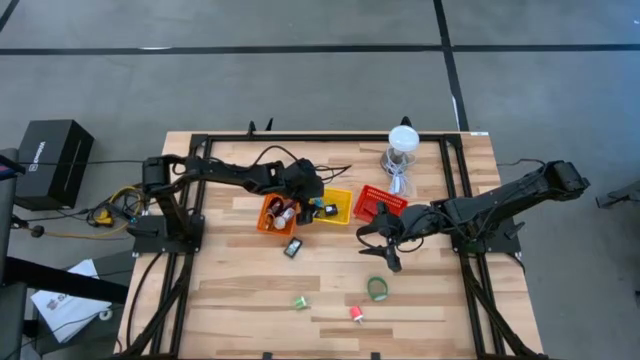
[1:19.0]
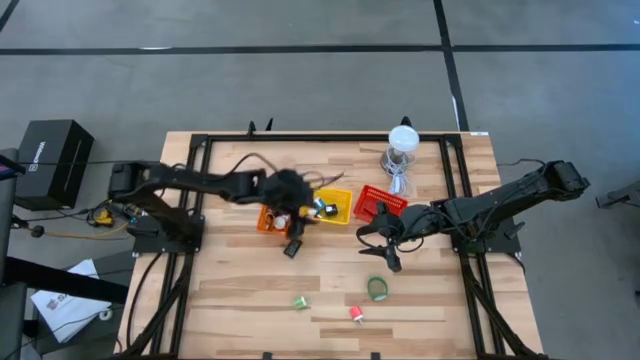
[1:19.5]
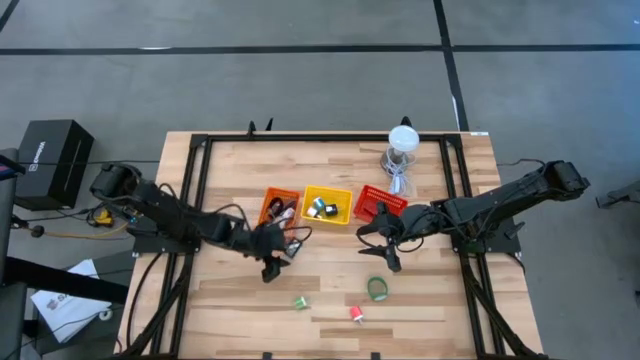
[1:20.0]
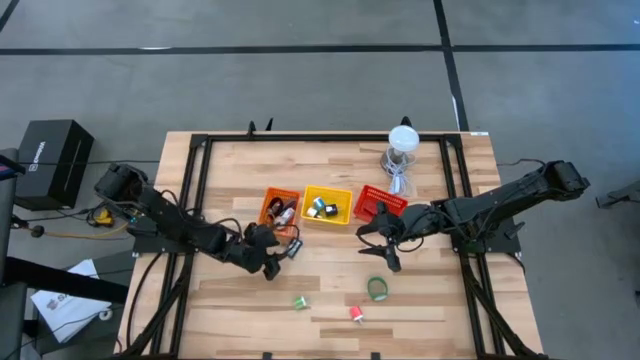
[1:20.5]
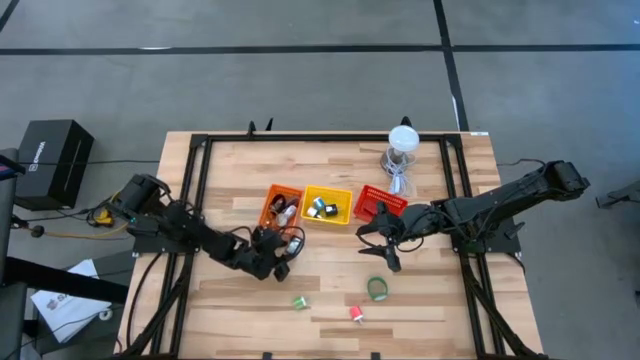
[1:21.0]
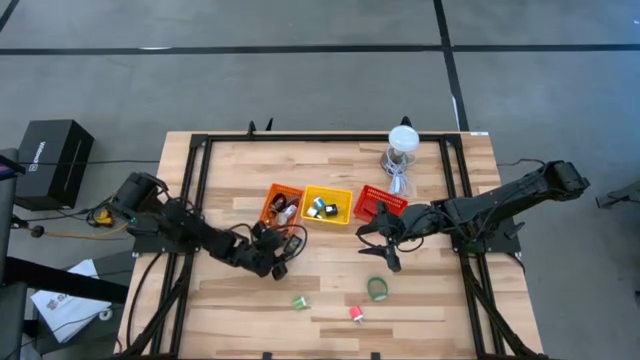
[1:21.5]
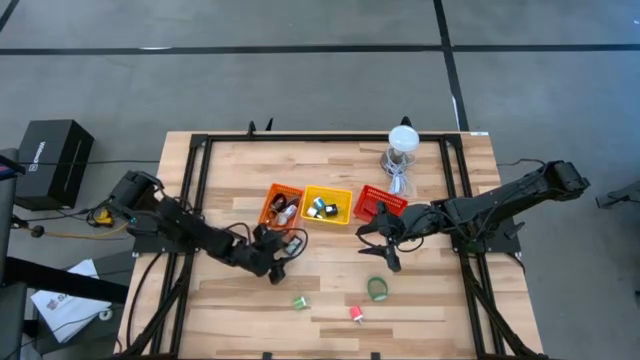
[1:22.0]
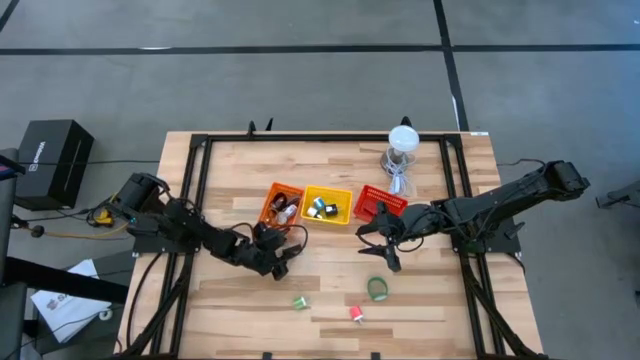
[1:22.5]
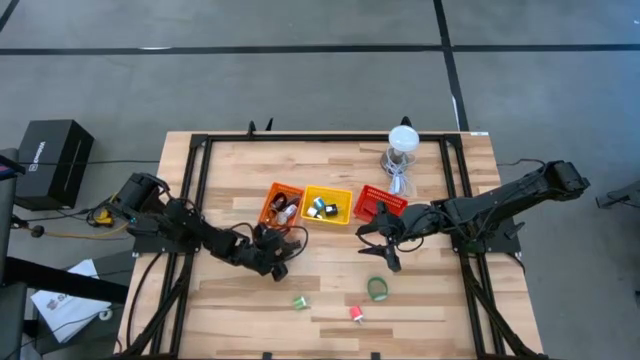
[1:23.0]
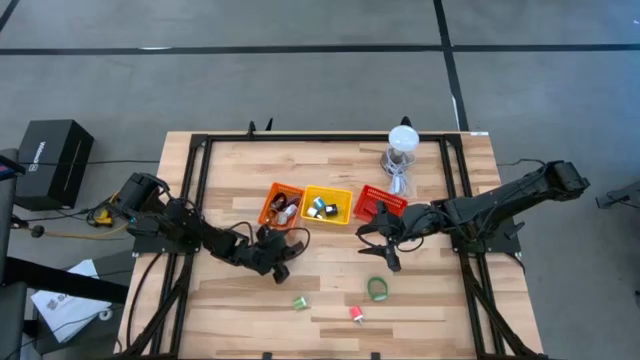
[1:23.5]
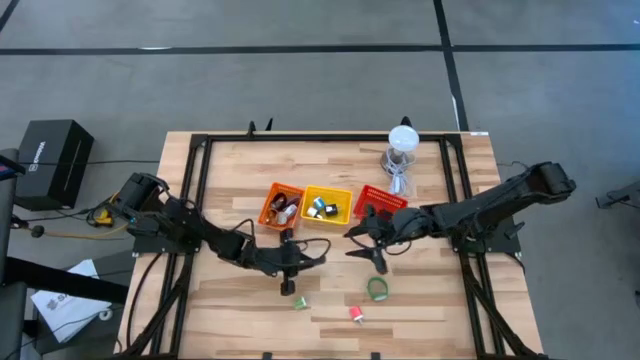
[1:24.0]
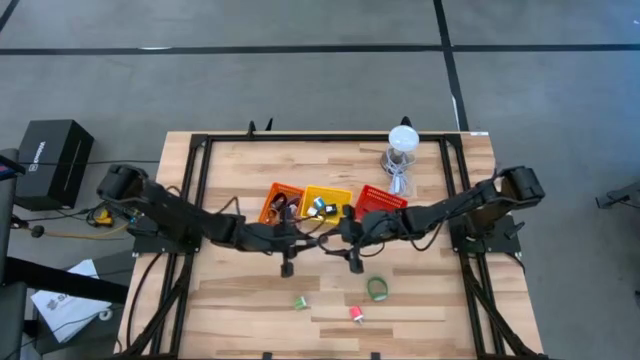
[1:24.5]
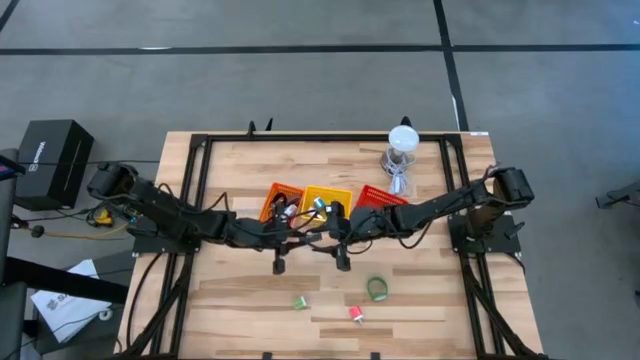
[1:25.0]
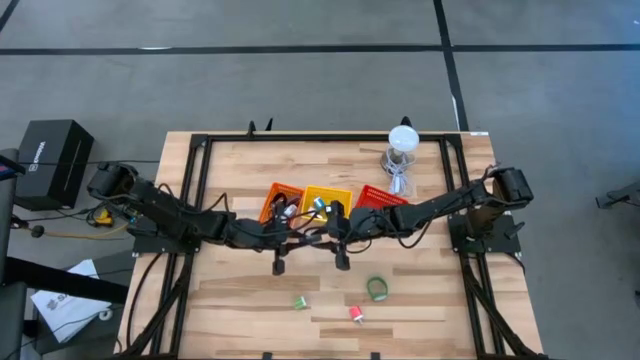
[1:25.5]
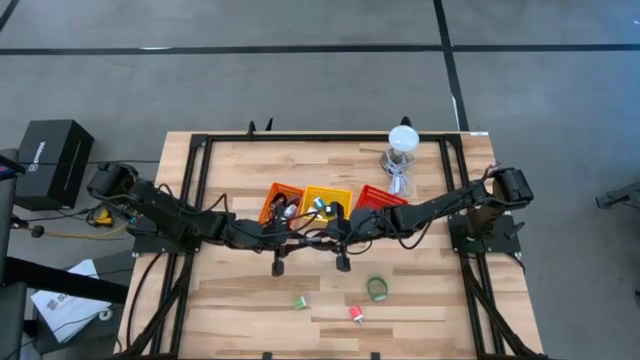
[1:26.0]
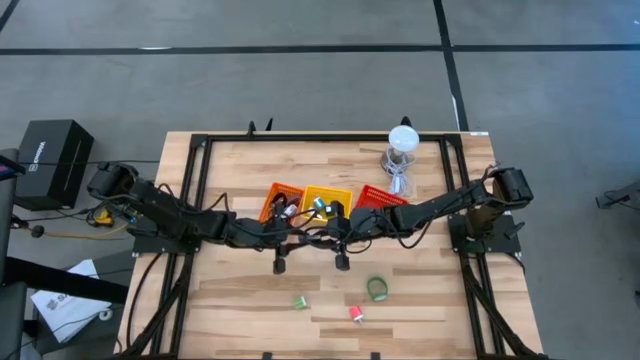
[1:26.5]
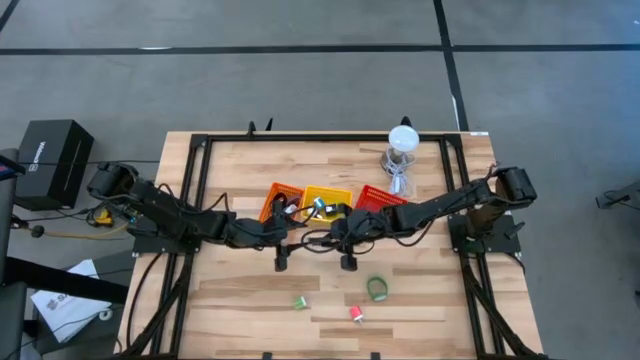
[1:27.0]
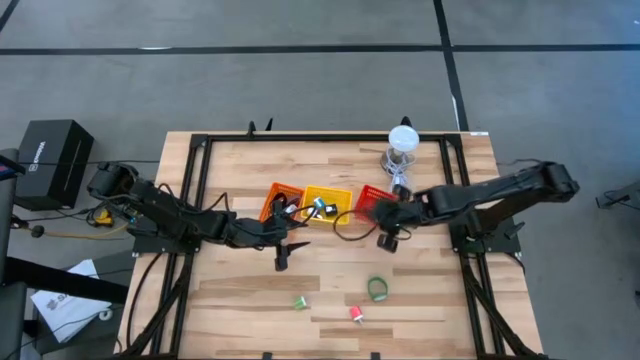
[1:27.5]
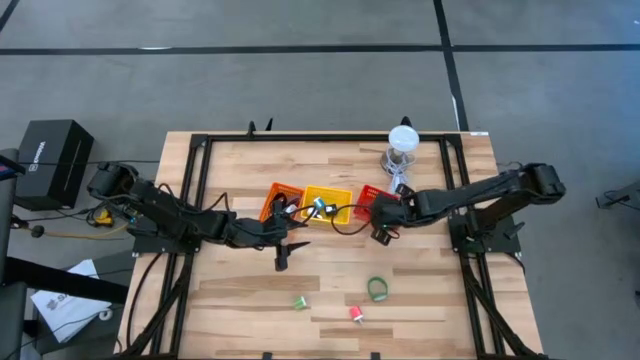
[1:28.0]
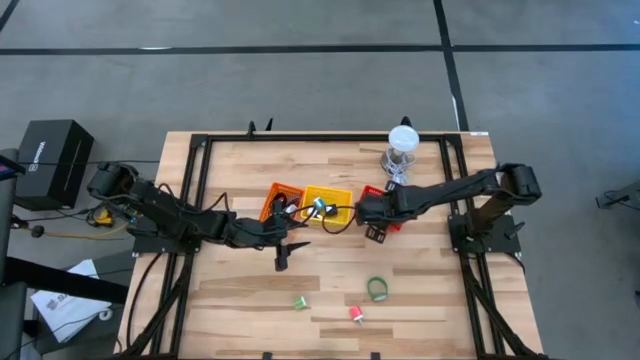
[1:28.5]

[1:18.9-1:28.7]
Task: Pick & Place Office items
Put the black digital timer into the red bin

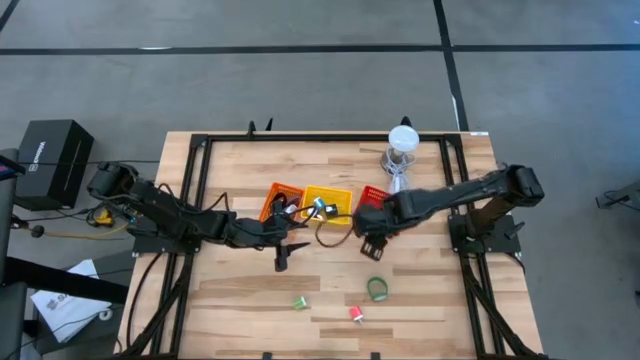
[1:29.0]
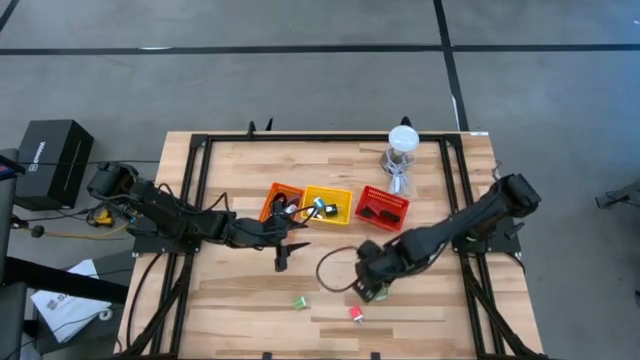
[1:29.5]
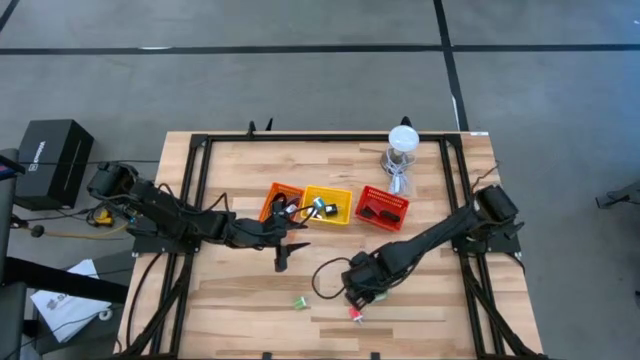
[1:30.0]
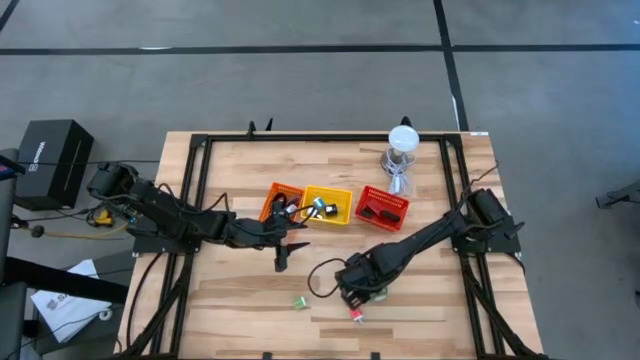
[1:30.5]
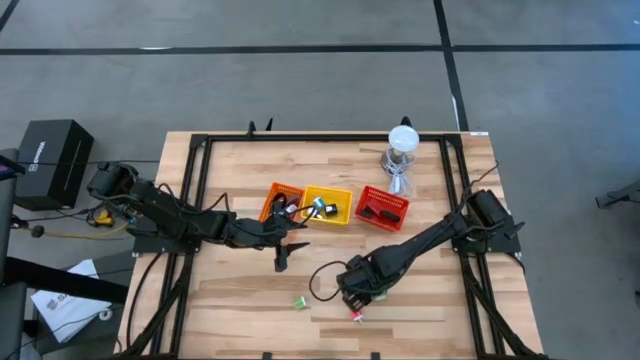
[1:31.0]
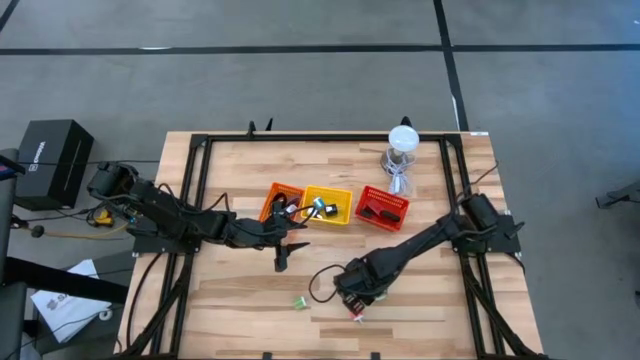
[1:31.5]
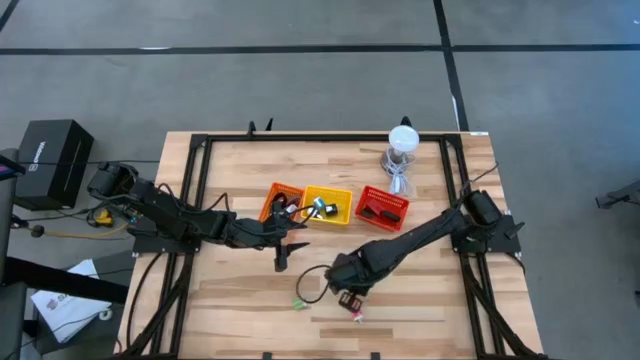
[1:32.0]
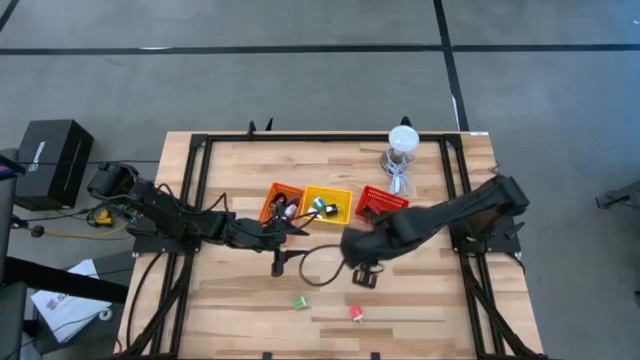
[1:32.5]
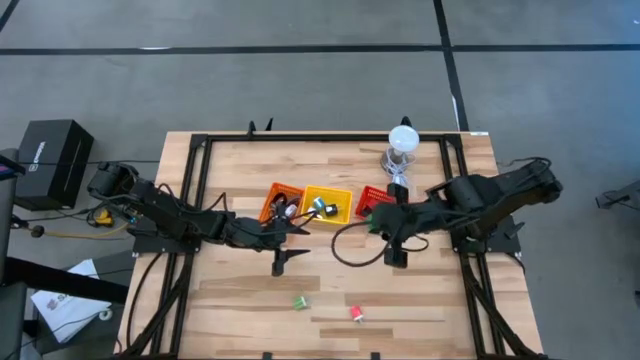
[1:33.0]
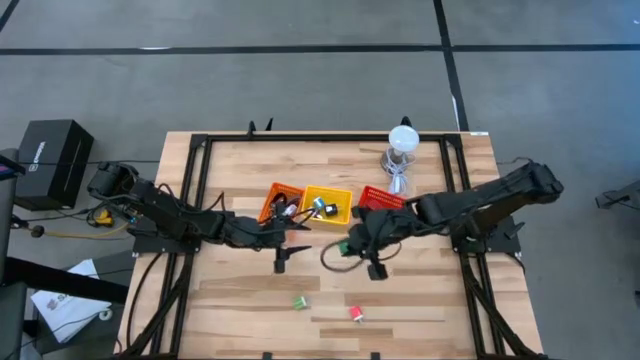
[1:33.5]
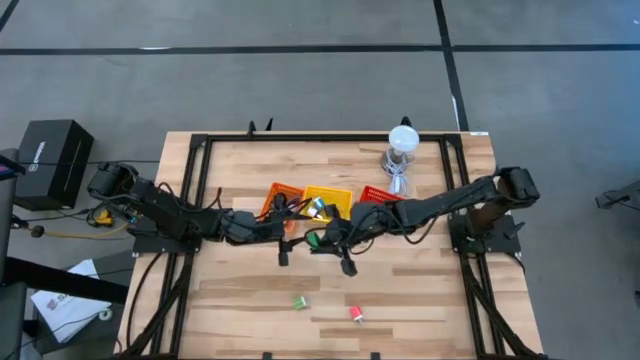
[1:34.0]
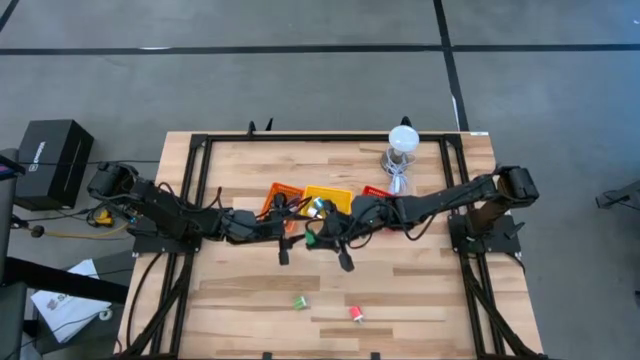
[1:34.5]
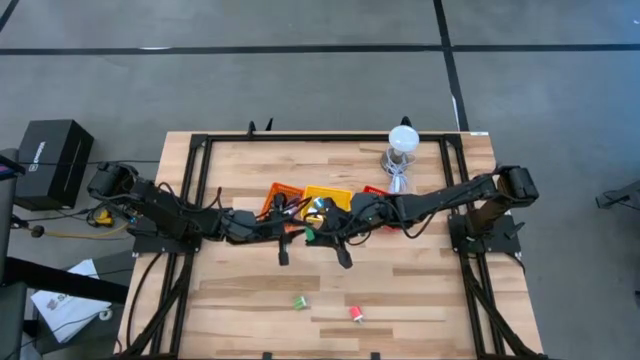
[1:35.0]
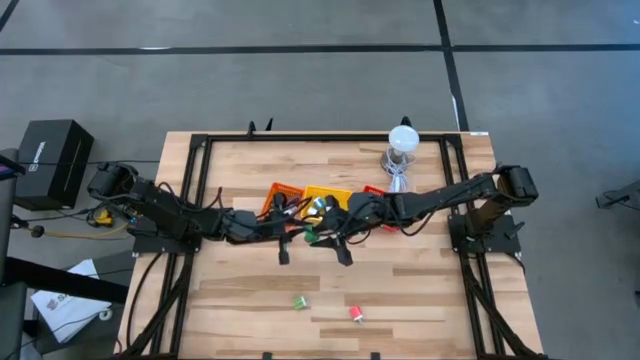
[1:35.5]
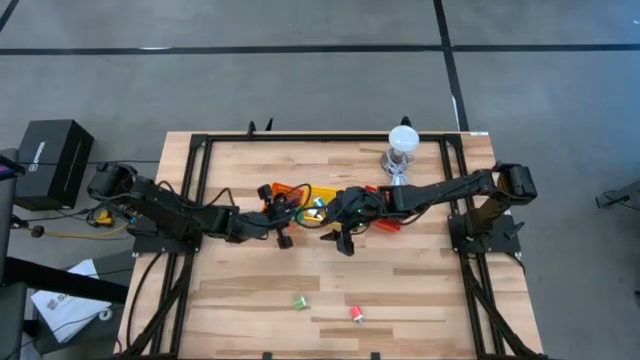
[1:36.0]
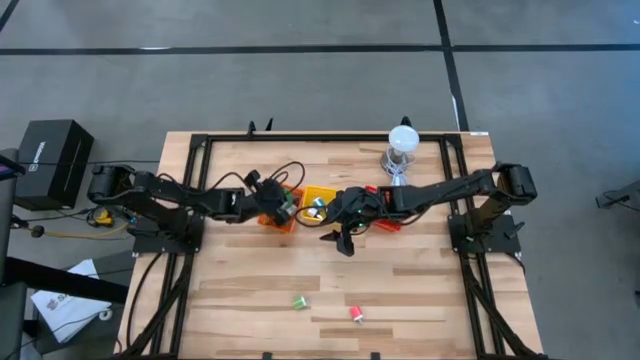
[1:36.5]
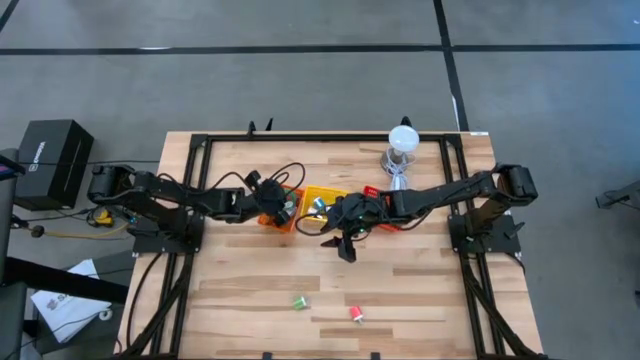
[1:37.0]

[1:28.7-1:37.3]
Put the green wristwatch into the orange bin

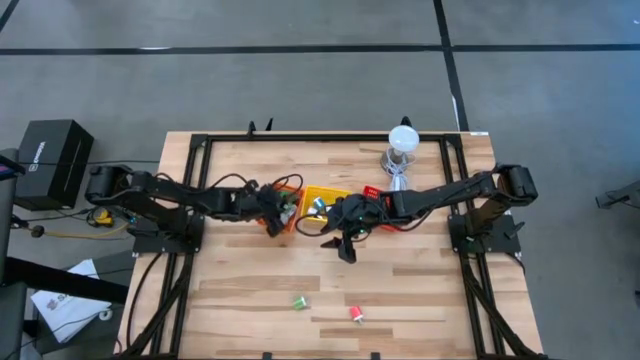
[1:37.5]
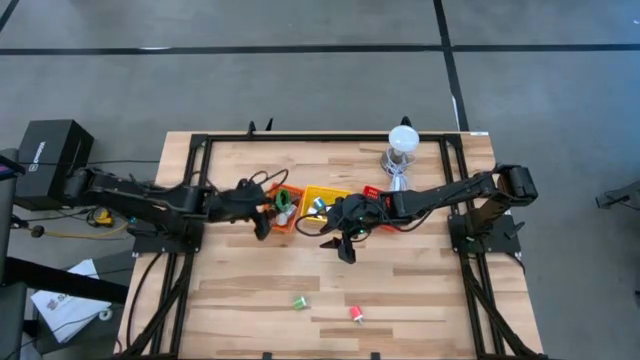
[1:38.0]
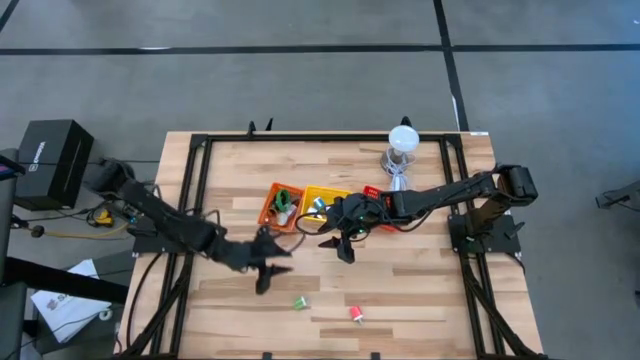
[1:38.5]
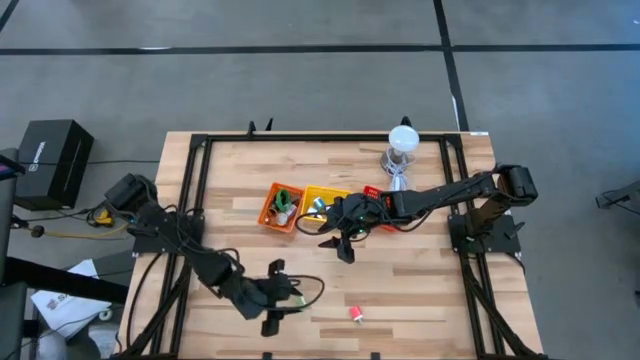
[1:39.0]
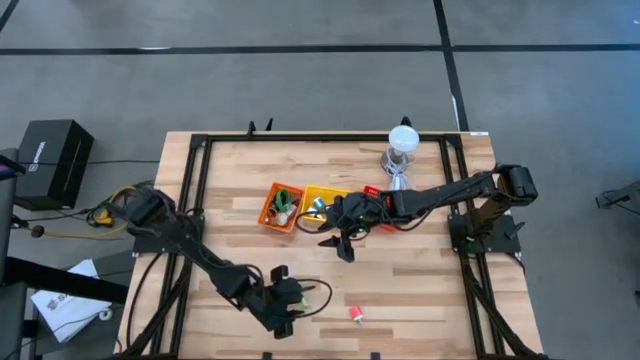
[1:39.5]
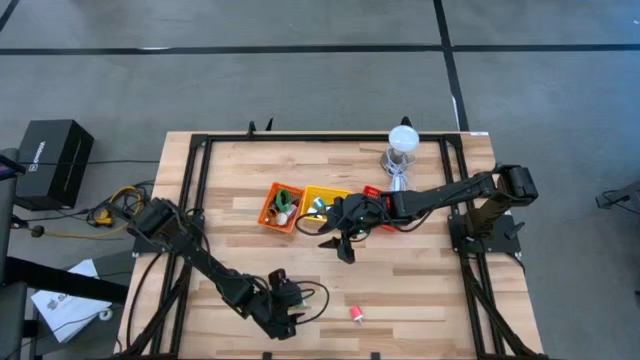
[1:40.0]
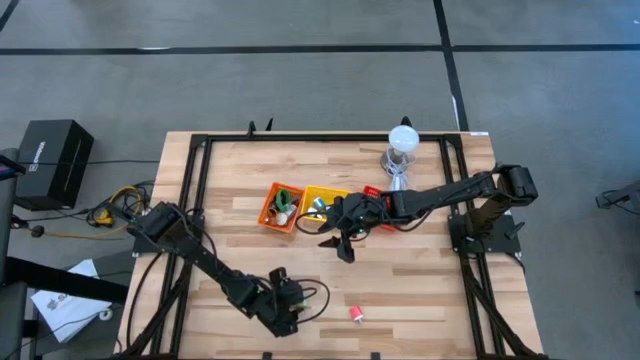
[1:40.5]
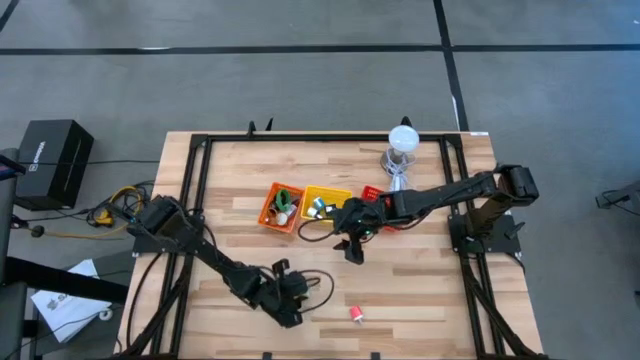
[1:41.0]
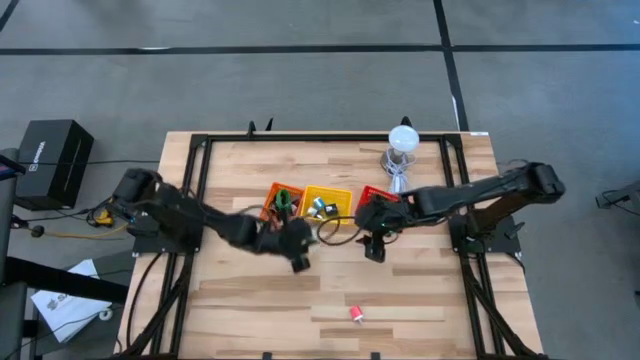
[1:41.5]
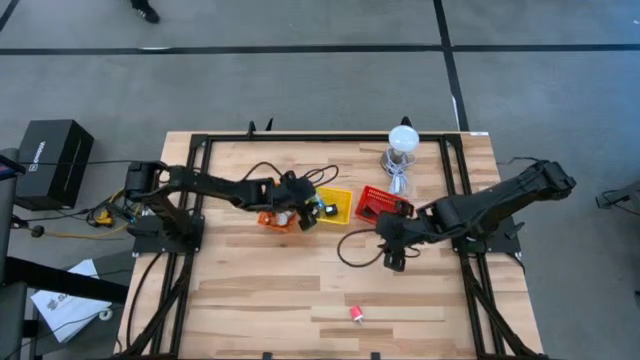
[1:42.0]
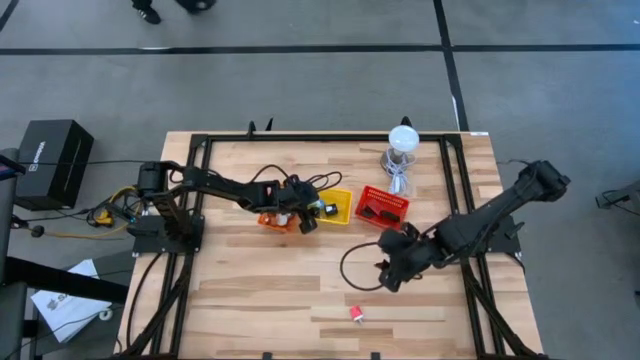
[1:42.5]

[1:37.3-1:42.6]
Put the green charger adapter into the yellow bin
